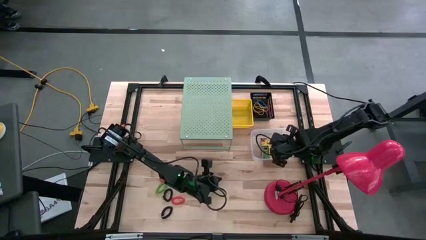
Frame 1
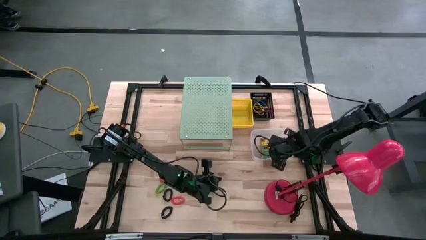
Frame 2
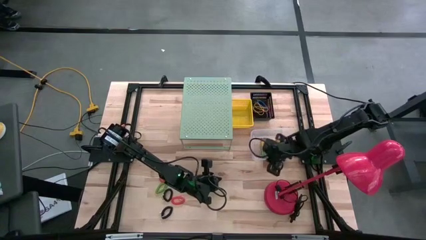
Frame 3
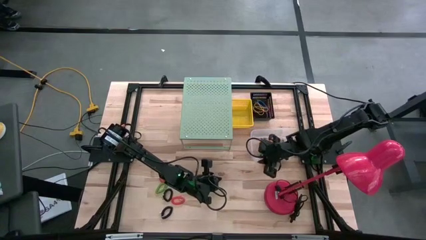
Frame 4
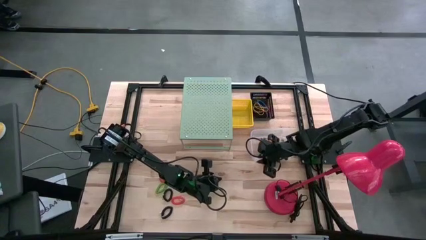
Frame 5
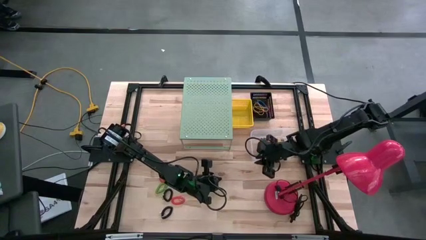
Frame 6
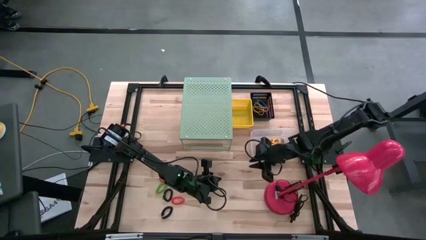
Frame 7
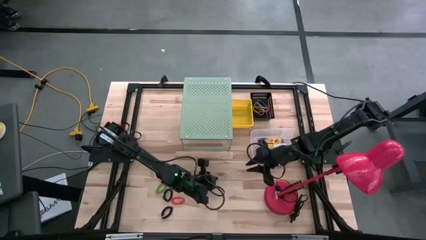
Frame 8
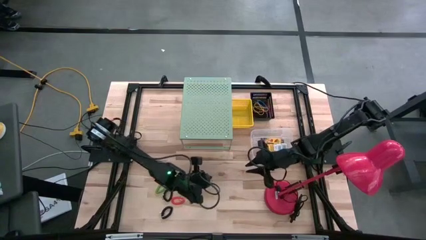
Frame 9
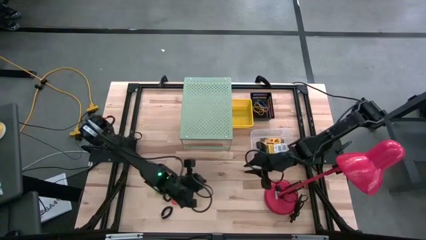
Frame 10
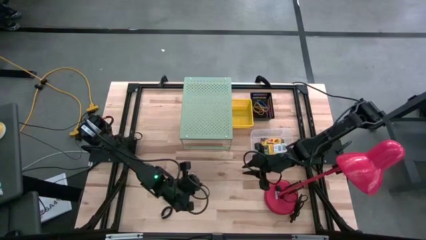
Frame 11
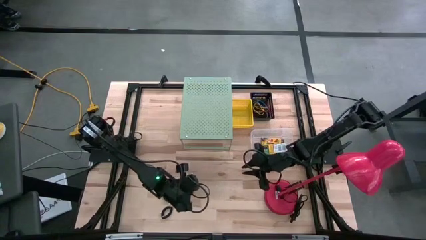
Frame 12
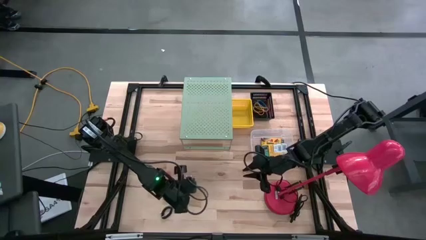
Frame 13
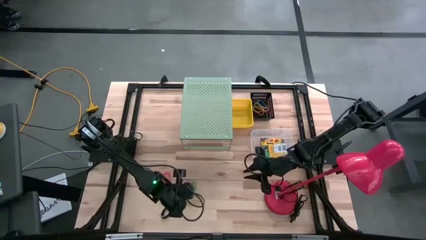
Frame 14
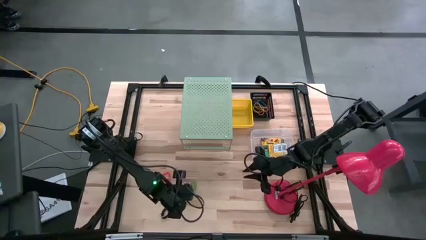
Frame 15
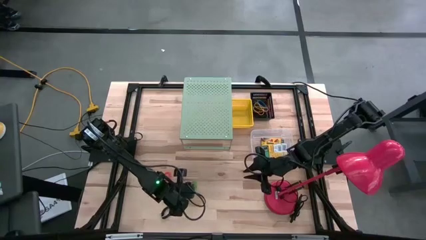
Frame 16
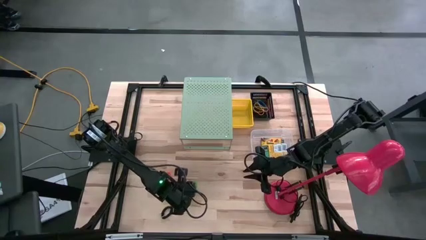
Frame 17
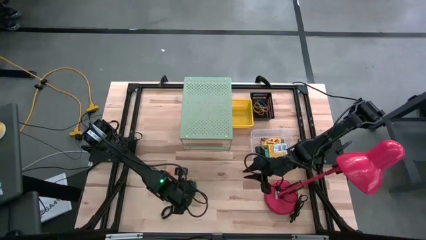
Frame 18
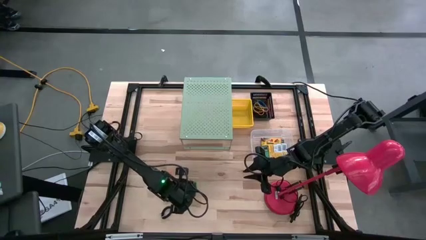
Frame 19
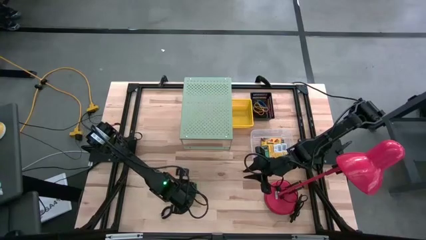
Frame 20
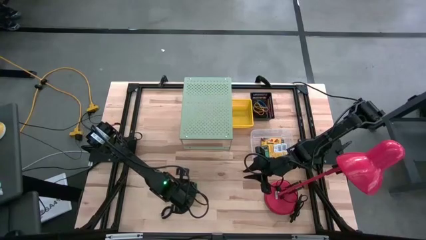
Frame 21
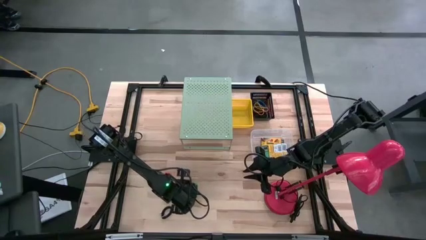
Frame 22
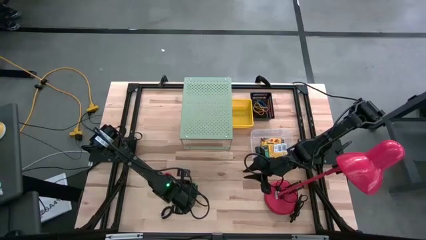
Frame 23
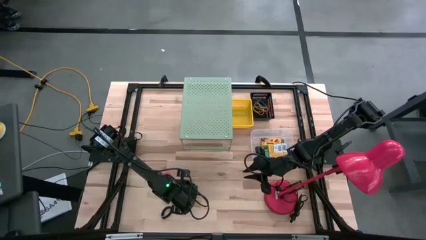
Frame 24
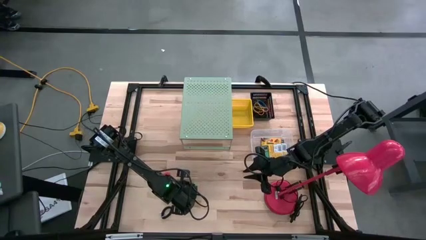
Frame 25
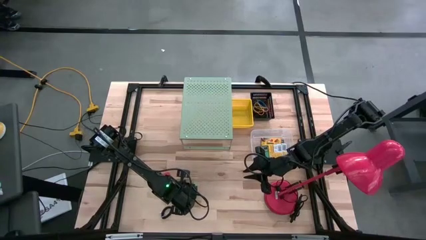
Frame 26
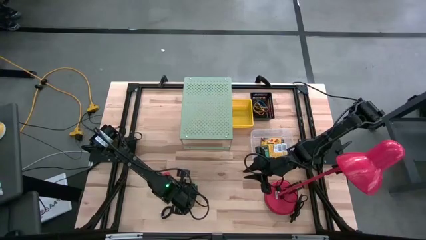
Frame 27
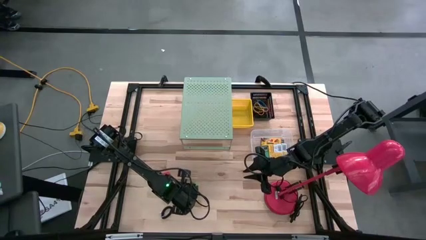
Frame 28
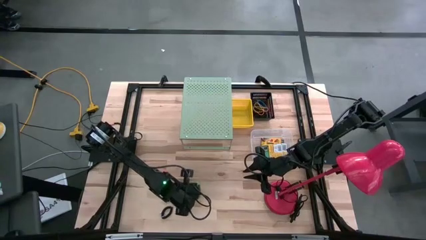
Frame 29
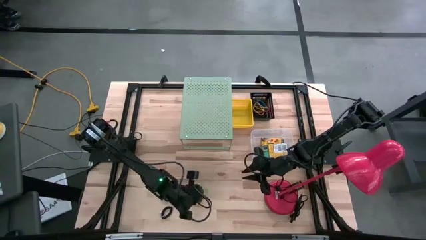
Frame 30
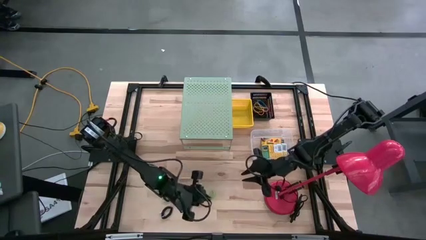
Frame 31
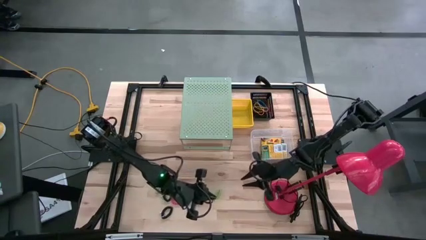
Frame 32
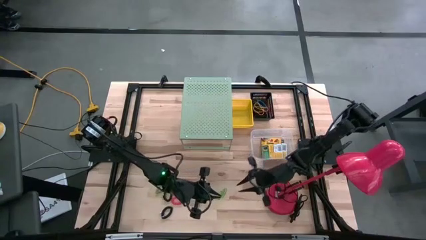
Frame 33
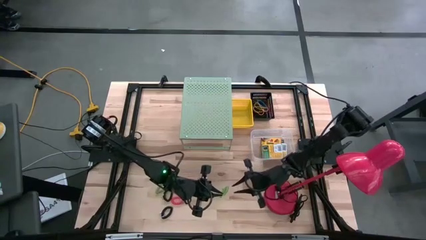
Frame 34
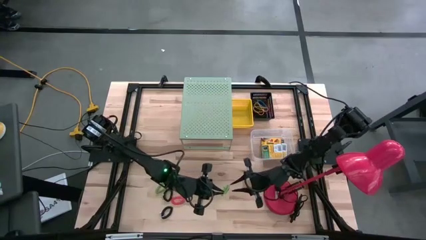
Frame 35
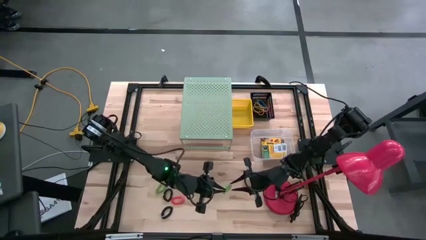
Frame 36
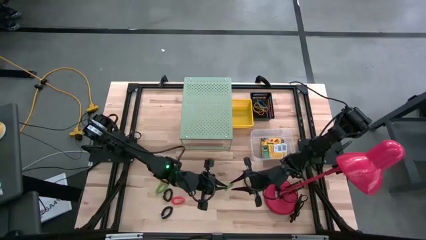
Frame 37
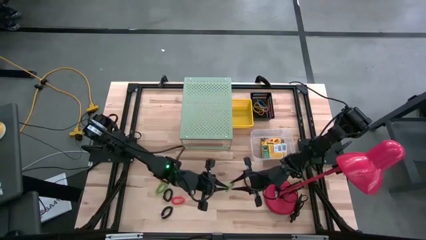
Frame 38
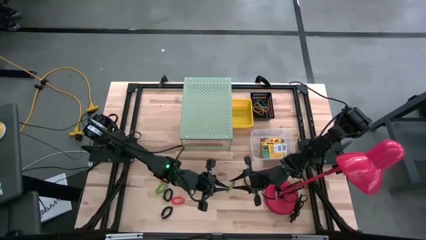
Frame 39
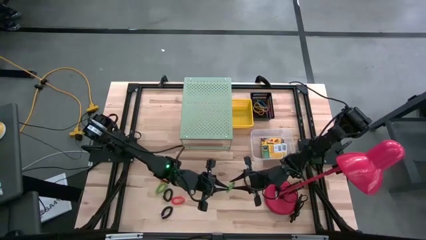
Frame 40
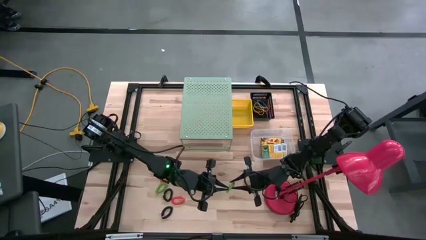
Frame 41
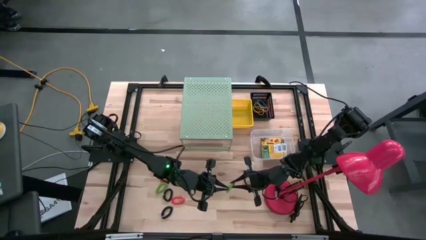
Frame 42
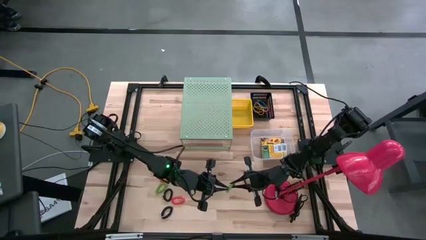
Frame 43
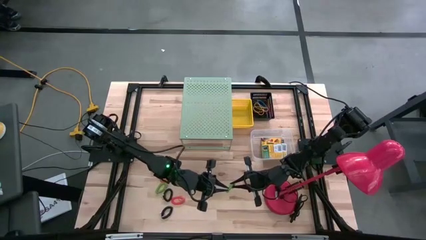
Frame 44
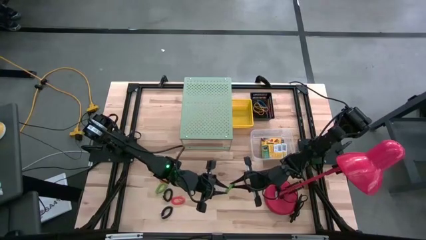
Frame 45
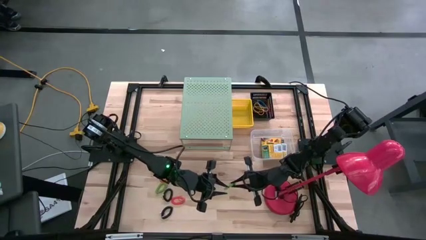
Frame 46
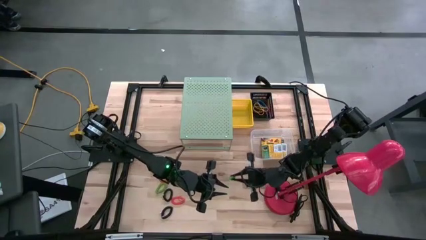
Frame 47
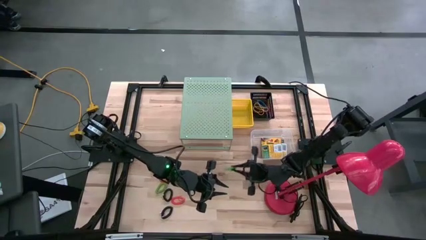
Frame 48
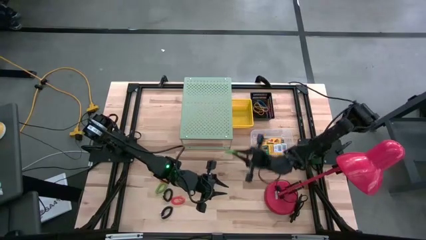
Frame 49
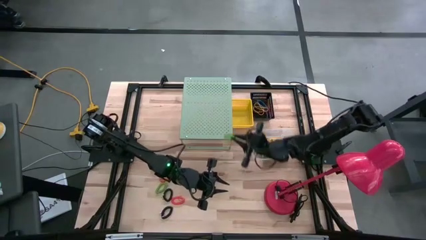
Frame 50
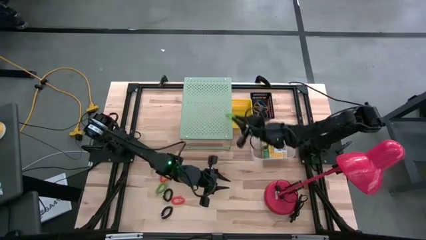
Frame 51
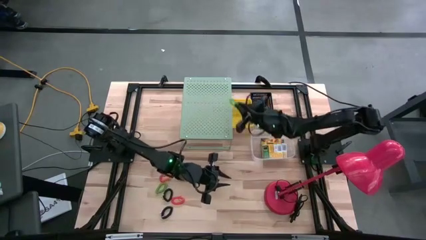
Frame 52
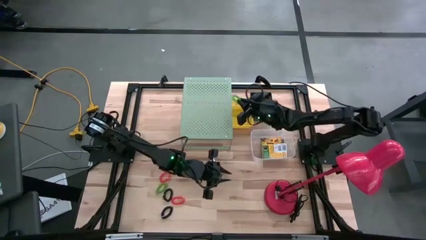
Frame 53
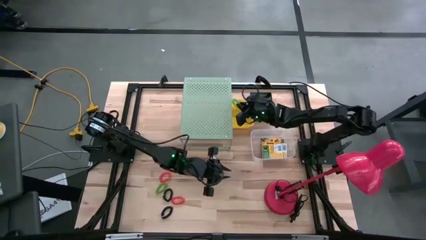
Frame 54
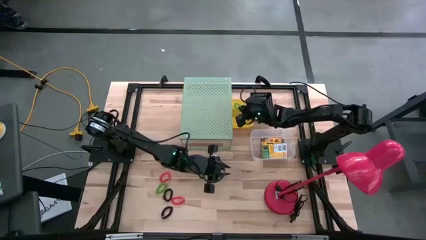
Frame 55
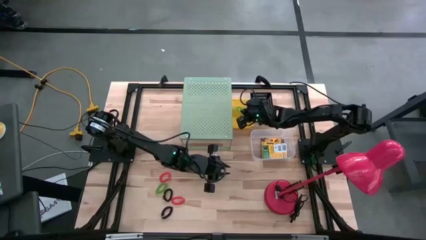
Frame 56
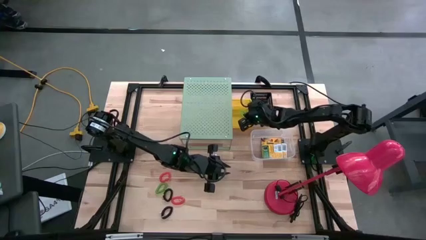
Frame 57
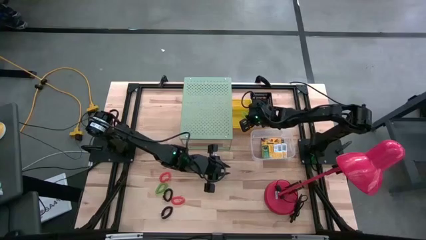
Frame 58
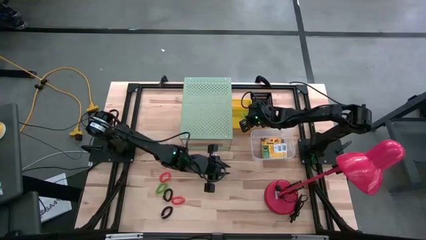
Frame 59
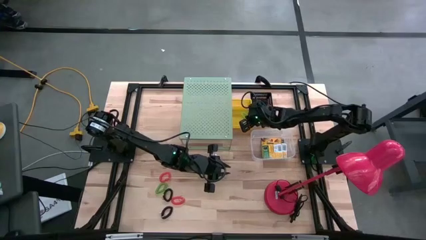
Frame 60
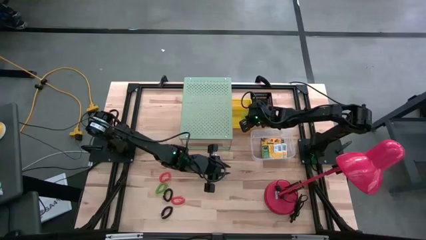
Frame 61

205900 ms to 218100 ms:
Task: Pick & Place Office Desk Supplies
Put the green spring keychain into the yellow bin
